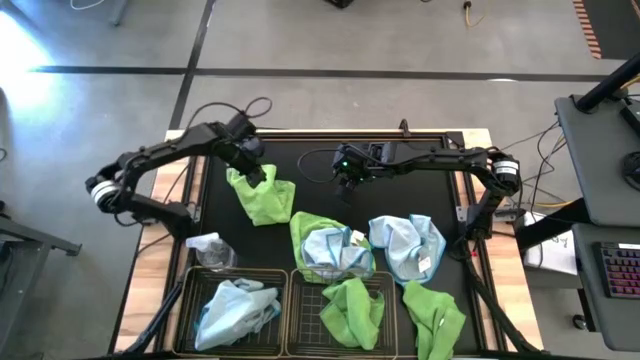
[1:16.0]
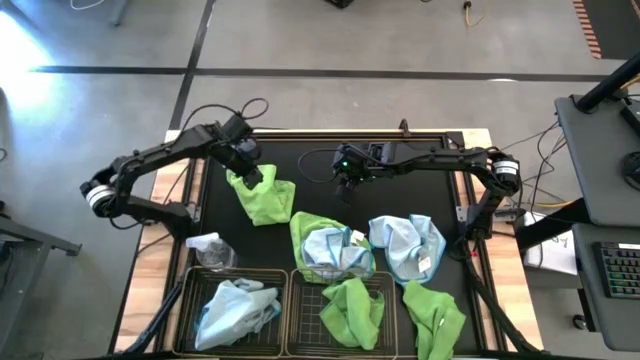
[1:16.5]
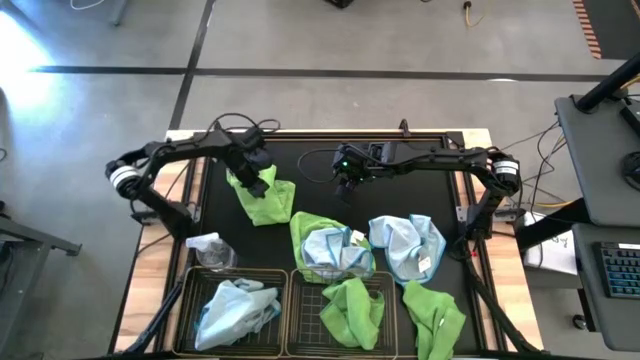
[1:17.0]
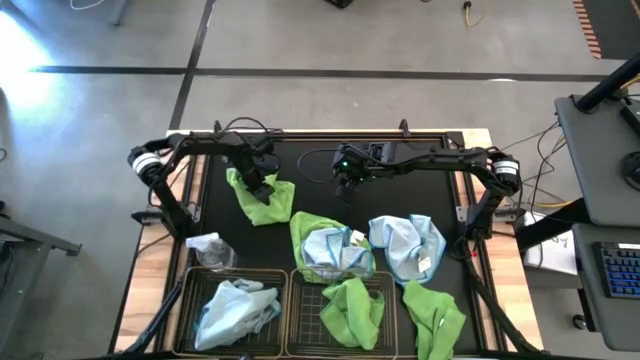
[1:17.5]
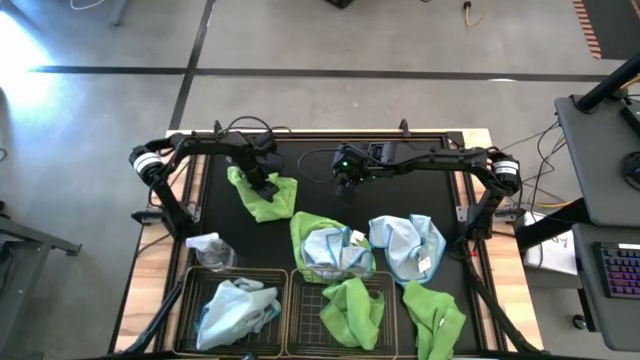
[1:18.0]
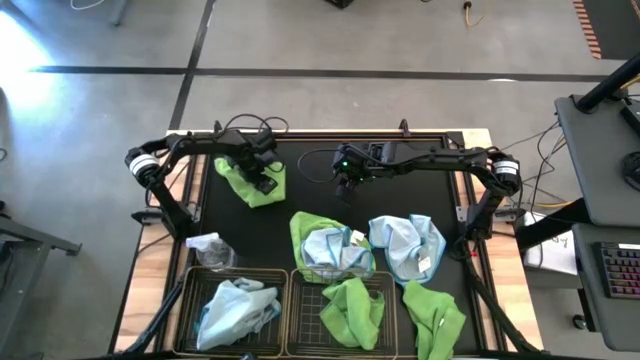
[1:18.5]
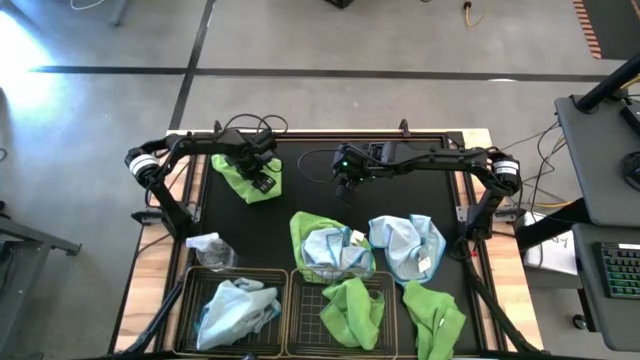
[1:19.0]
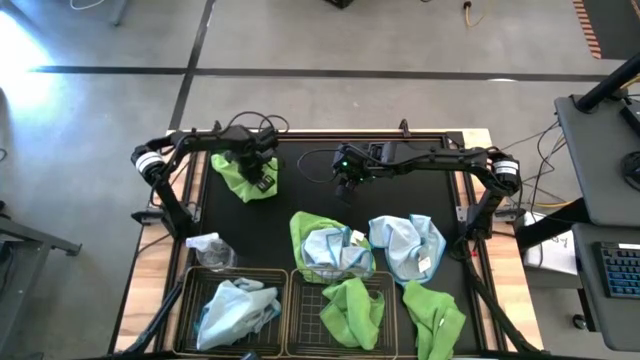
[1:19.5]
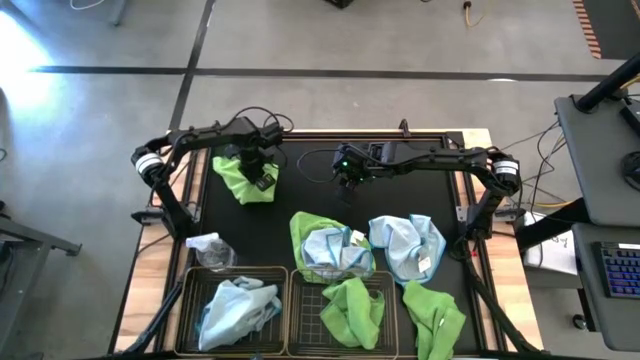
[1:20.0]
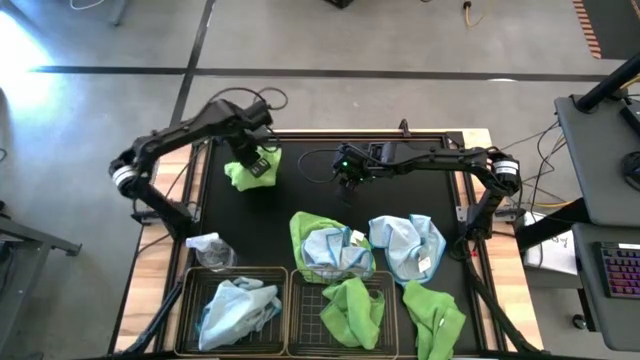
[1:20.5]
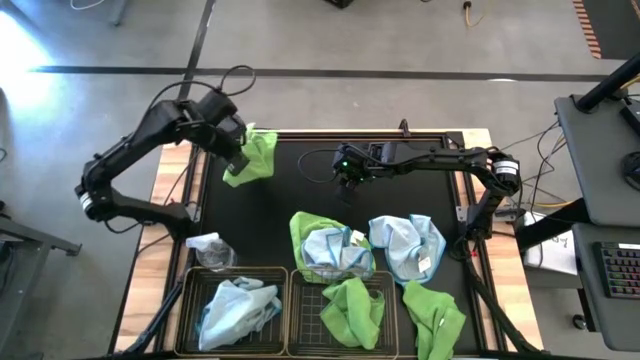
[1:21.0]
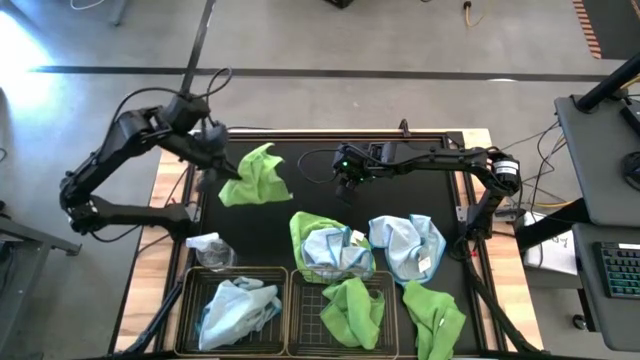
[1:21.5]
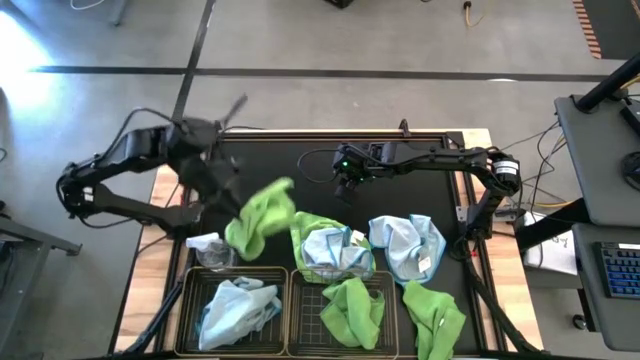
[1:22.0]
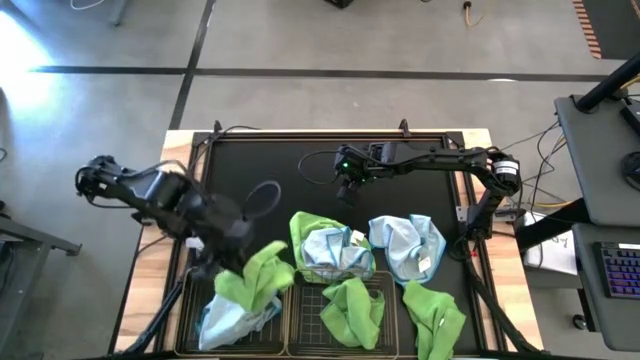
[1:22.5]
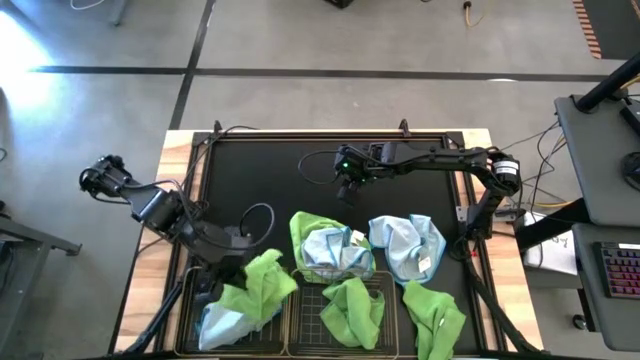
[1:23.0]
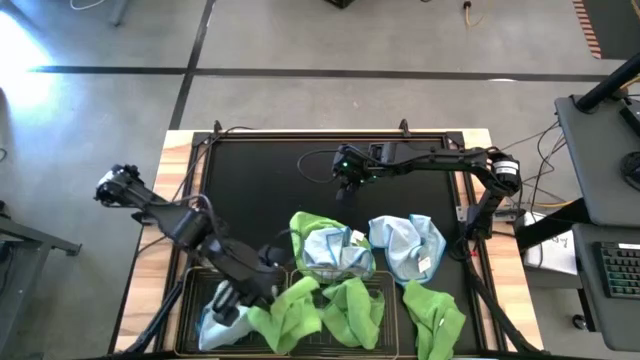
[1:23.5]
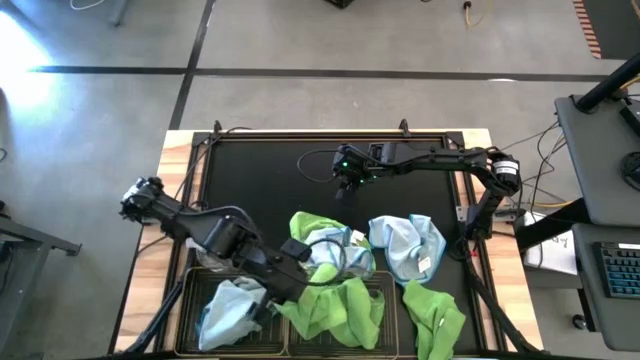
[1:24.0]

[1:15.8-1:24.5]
Task: Sort microfiber towel by color & place in baskets
Put the top green towel into the right wire basket

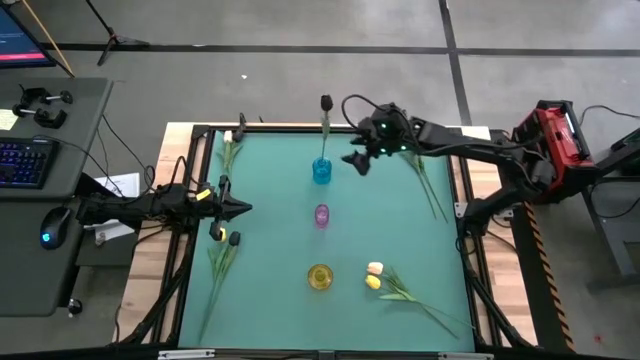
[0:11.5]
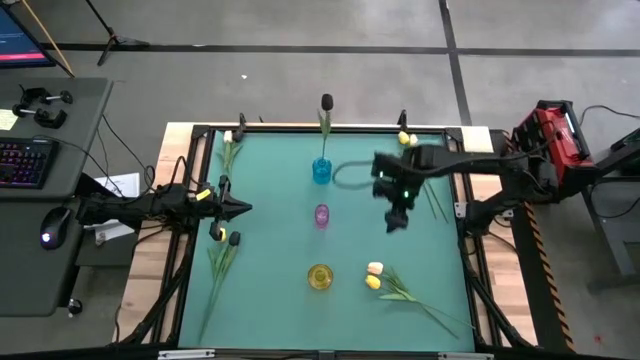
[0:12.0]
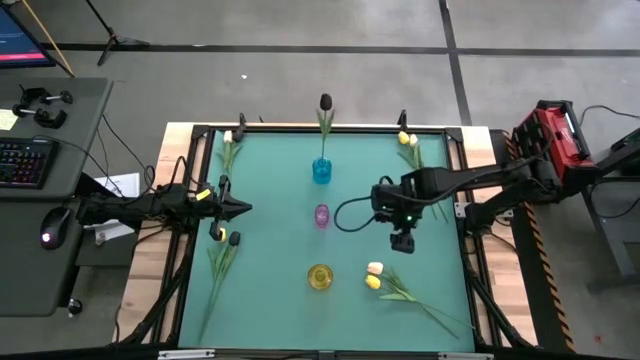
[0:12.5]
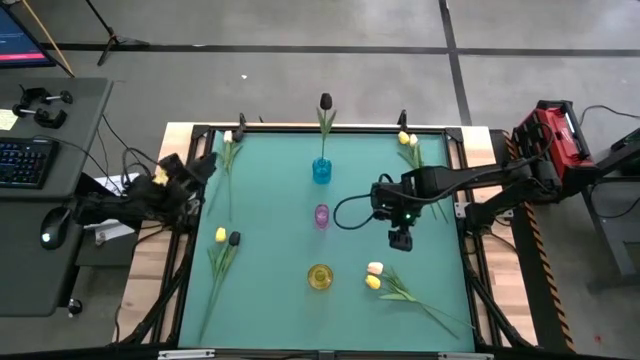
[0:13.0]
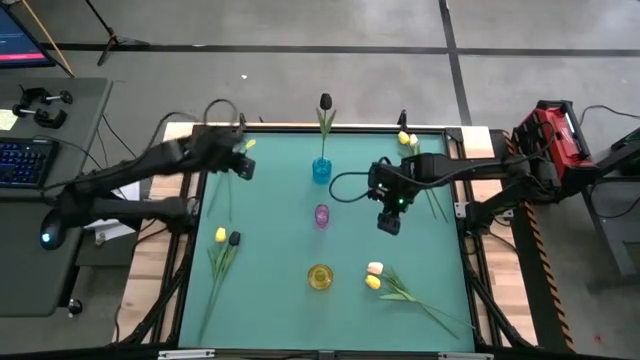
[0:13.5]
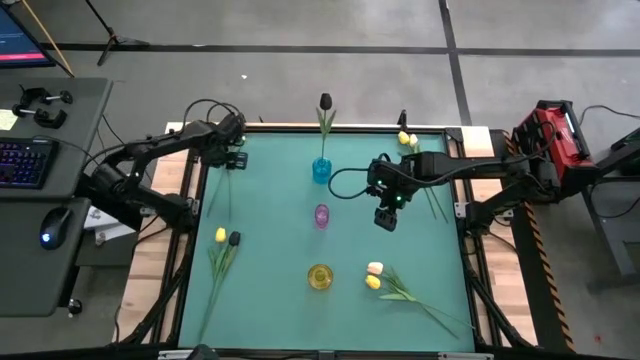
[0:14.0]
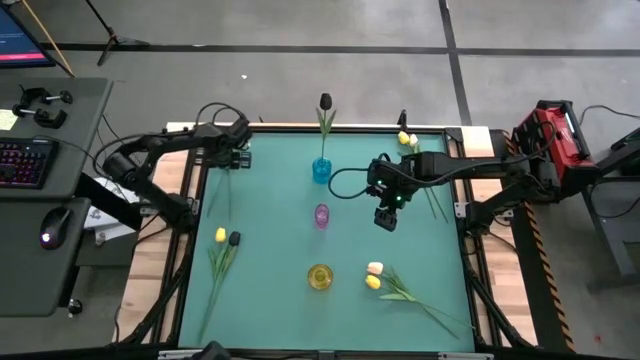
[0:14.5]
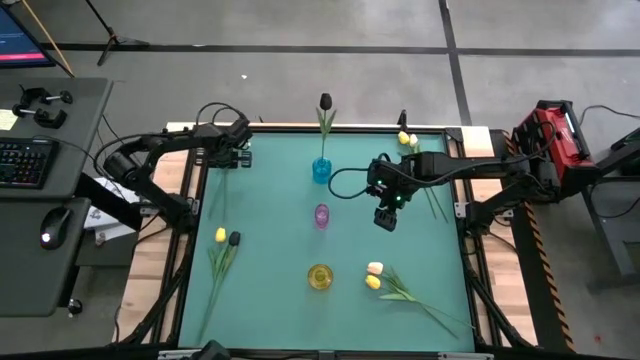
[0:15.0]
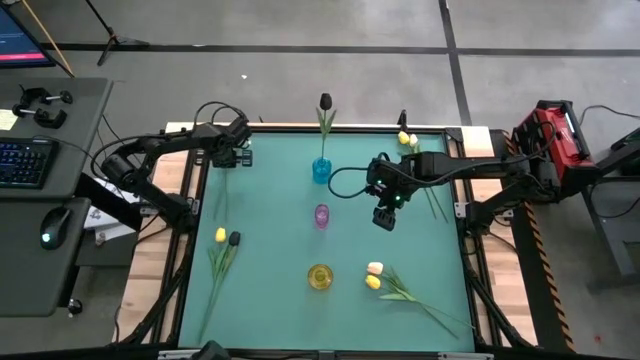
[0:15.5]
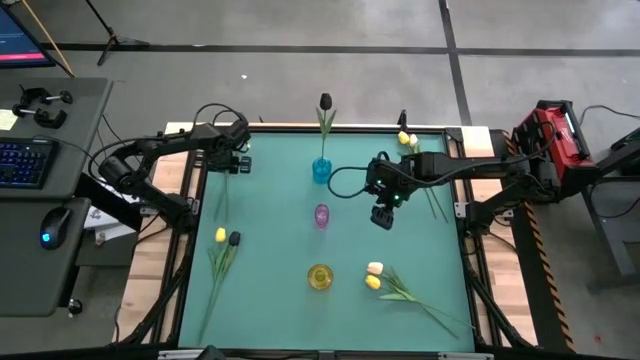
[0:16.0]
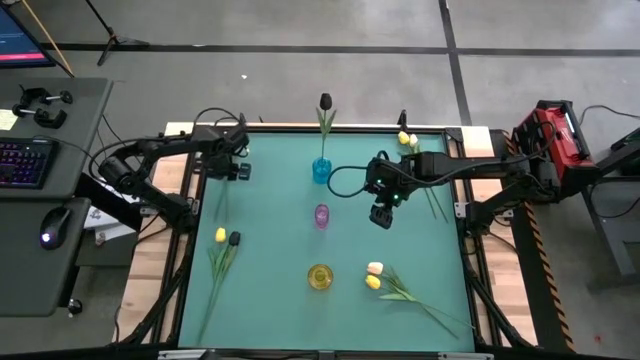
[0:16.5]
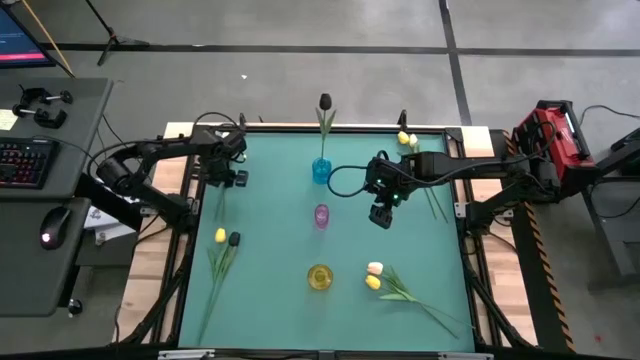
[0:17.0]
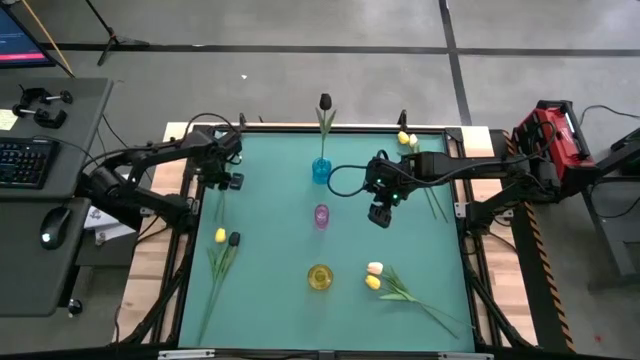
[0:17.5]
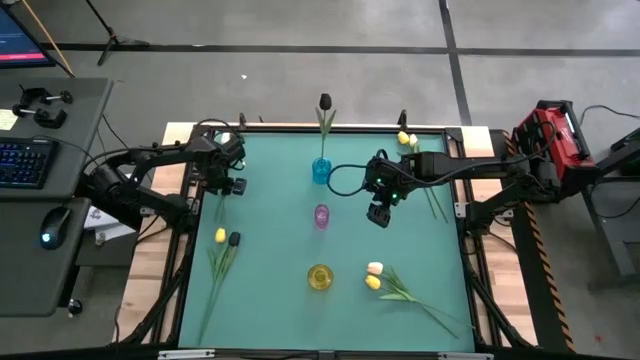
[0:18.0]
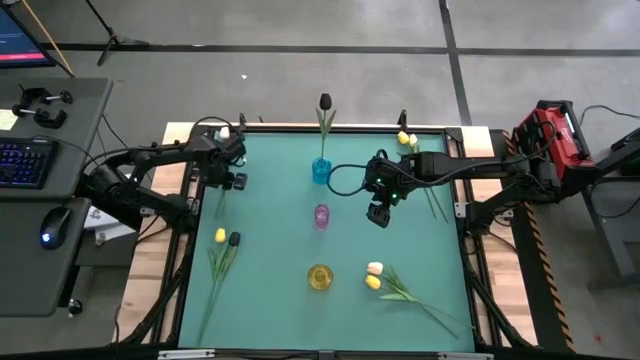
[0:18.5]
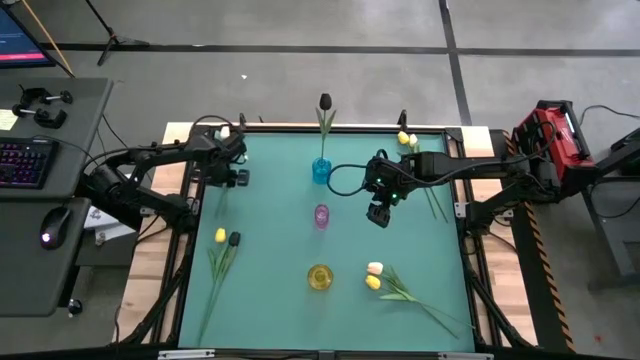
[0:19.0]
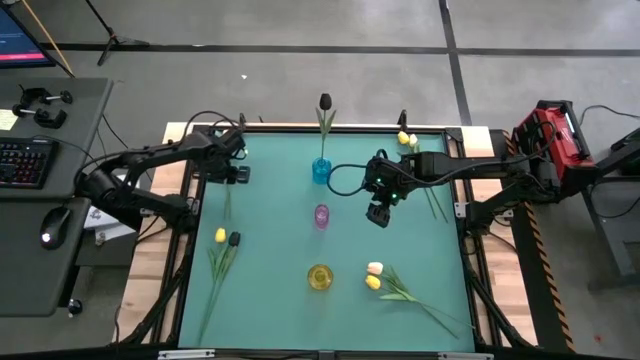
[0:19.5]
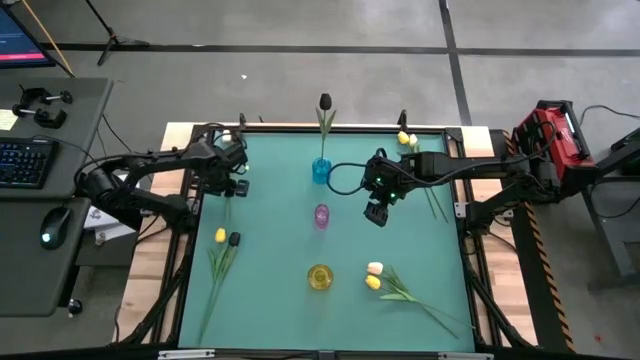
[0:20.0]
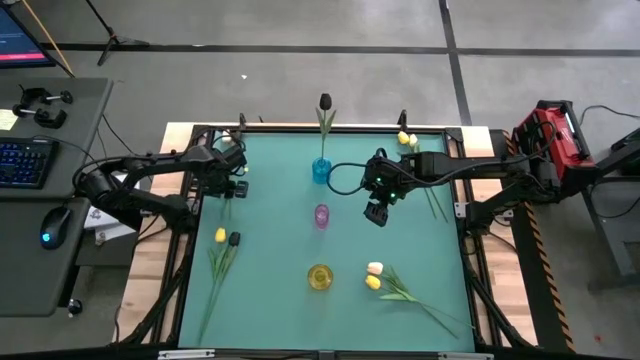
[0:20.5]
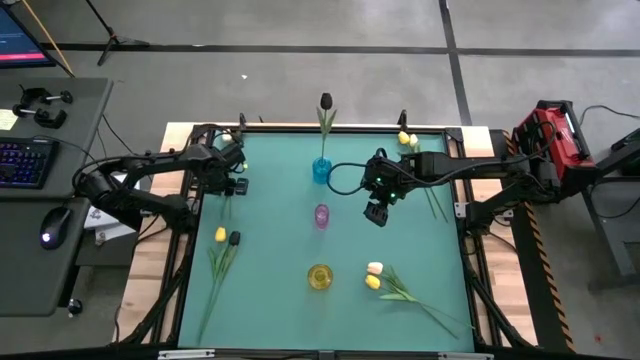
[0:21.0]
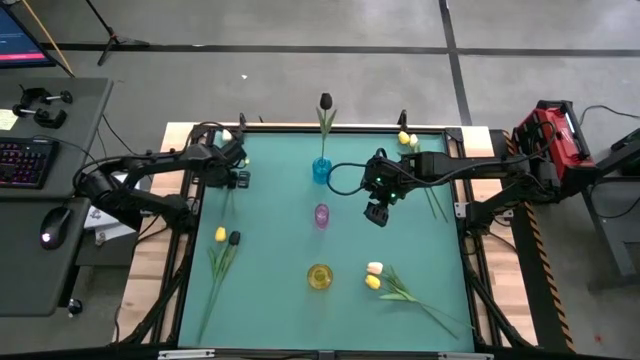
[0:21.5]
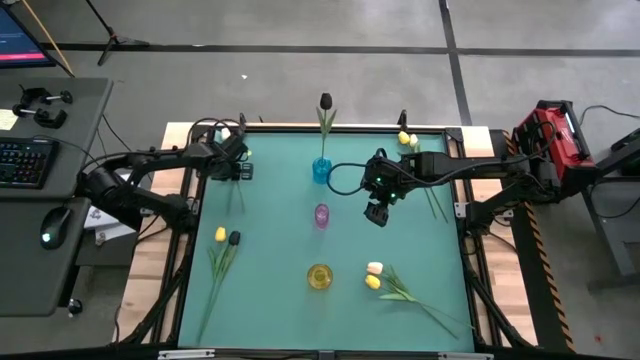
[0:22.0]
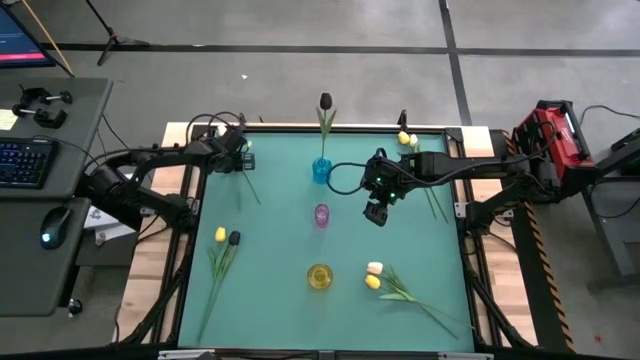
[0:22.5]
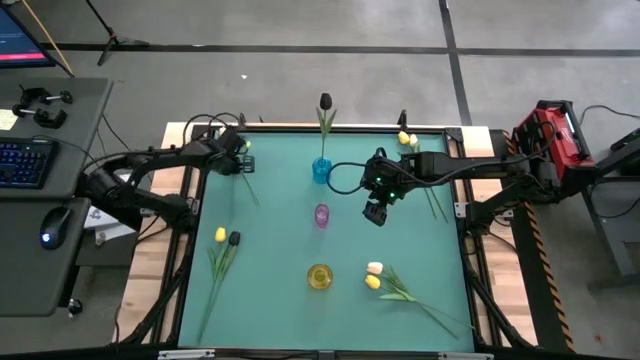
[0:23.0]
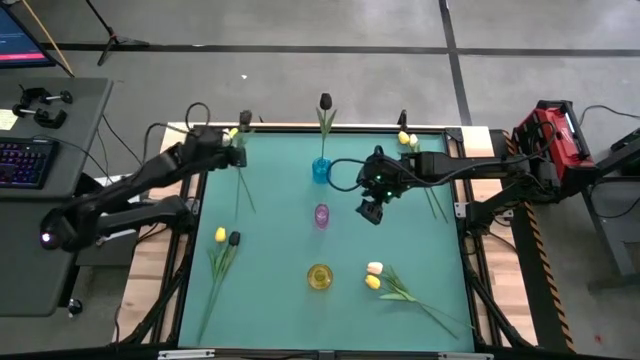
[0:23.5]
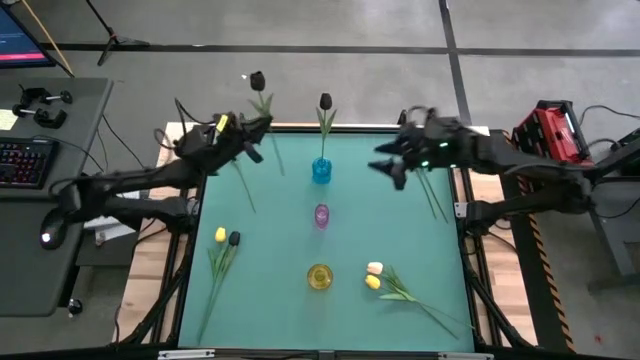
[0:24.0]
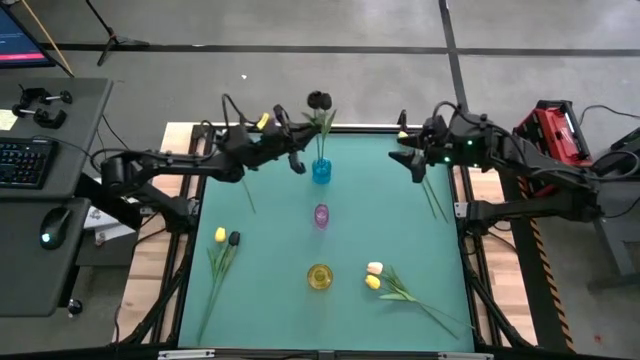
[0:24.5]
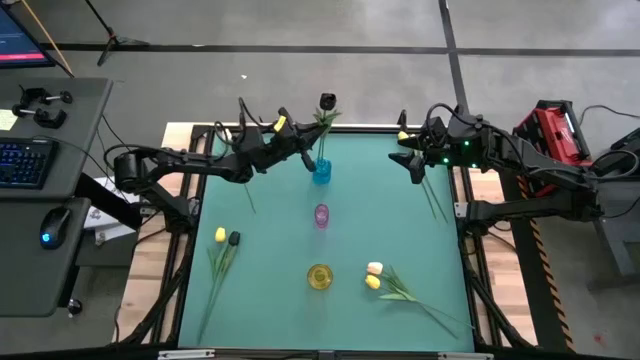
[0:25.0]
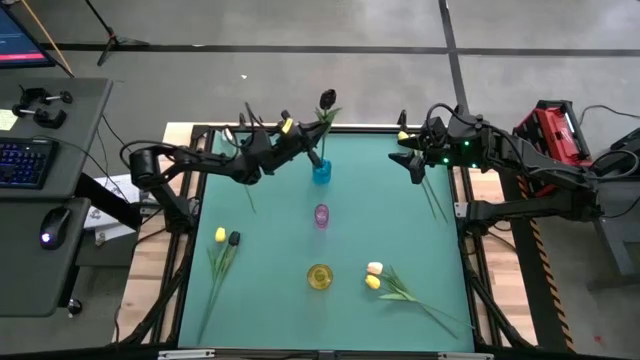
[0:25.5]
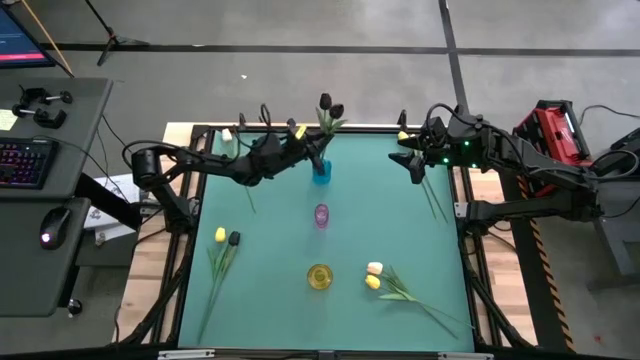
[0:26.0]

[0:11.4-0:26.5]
Task: Sort flowers into vase by color
Put the top left black tulip into the blue vase
